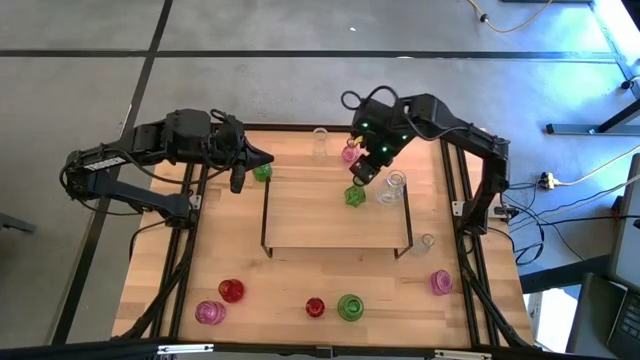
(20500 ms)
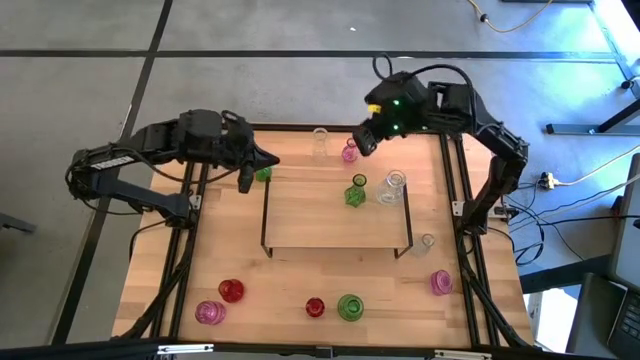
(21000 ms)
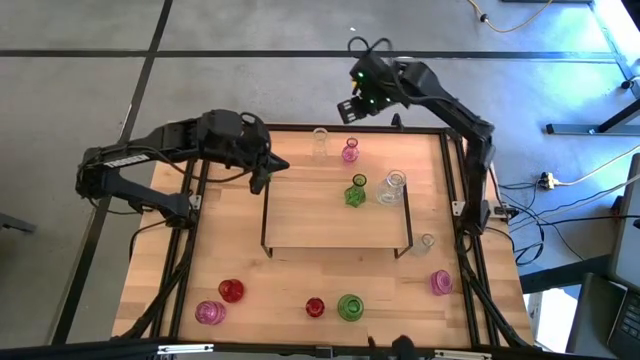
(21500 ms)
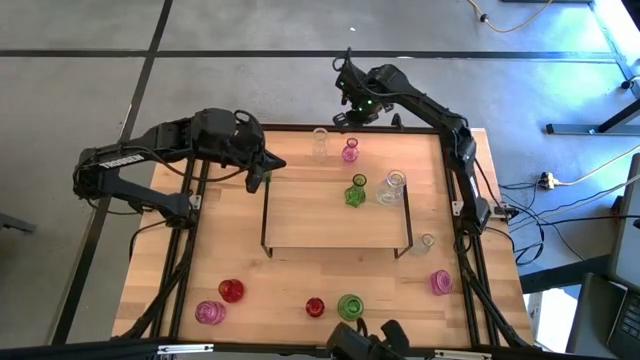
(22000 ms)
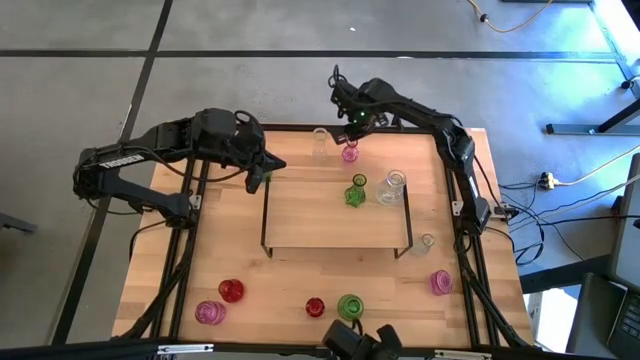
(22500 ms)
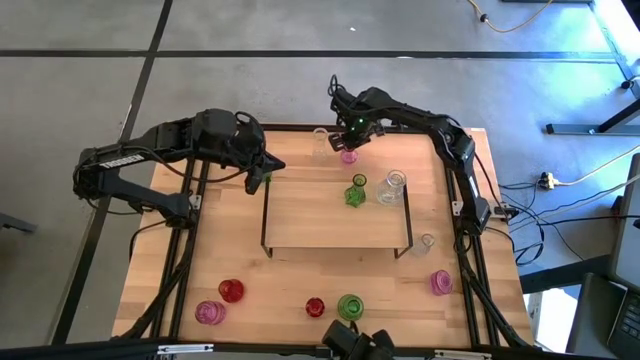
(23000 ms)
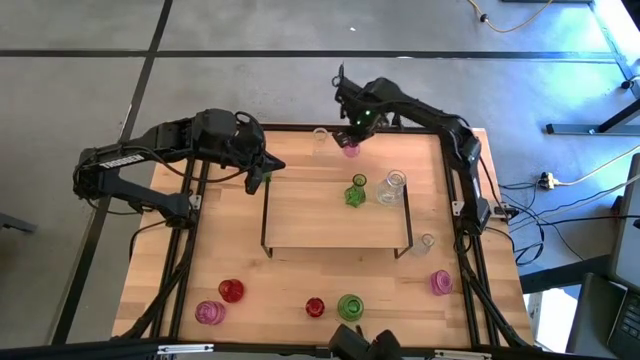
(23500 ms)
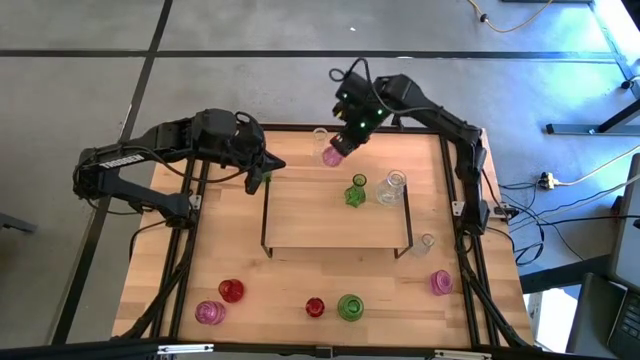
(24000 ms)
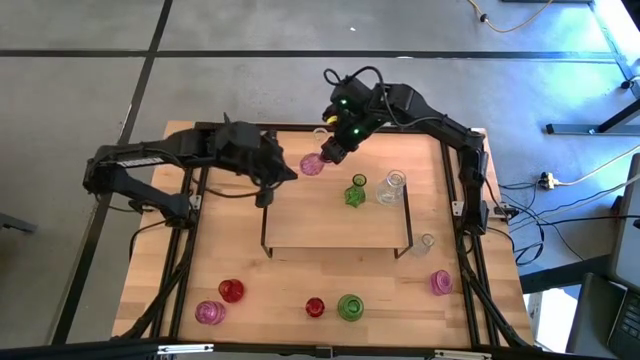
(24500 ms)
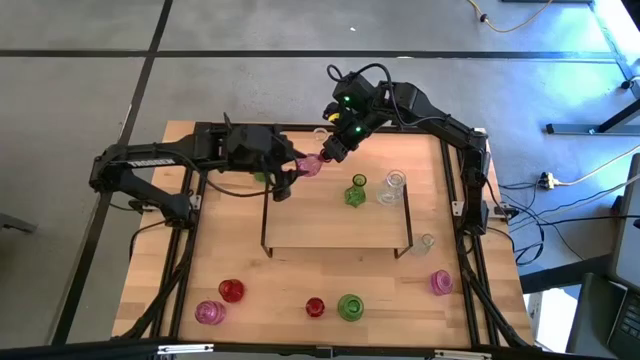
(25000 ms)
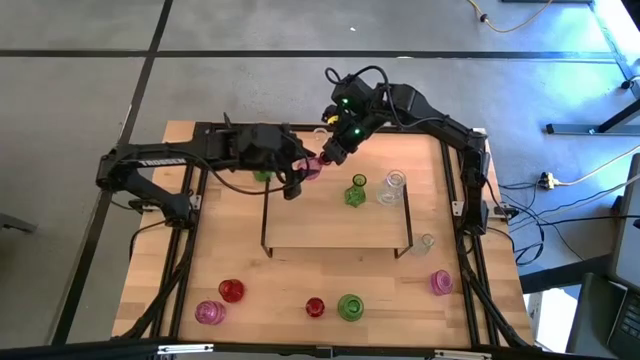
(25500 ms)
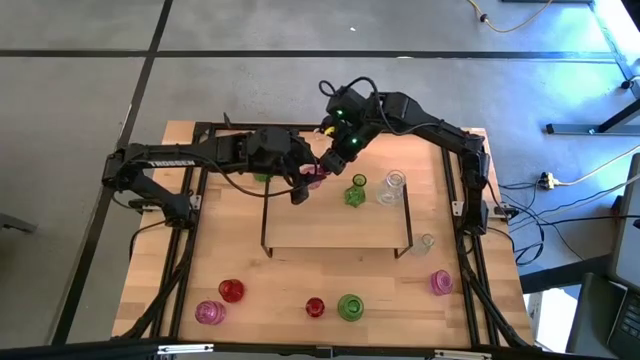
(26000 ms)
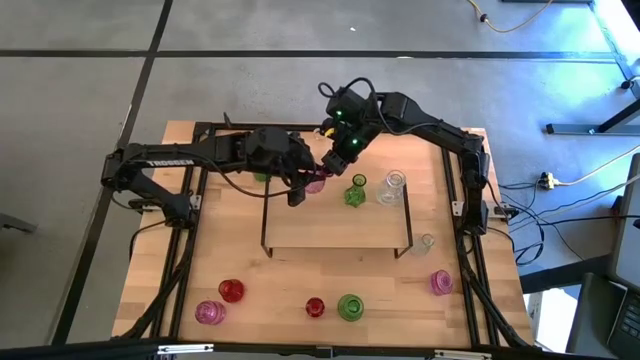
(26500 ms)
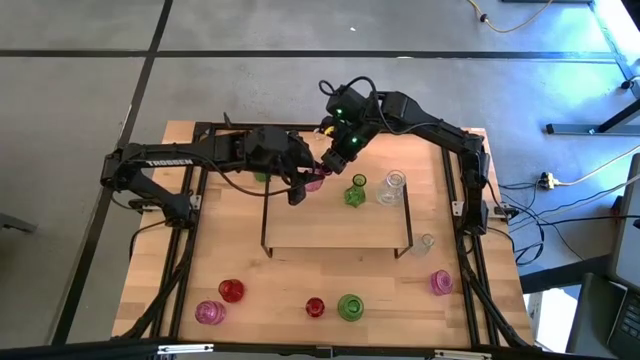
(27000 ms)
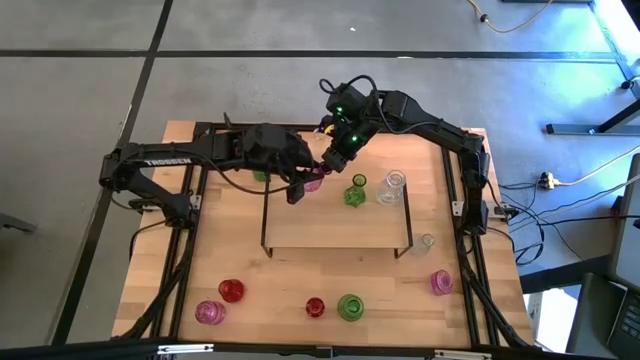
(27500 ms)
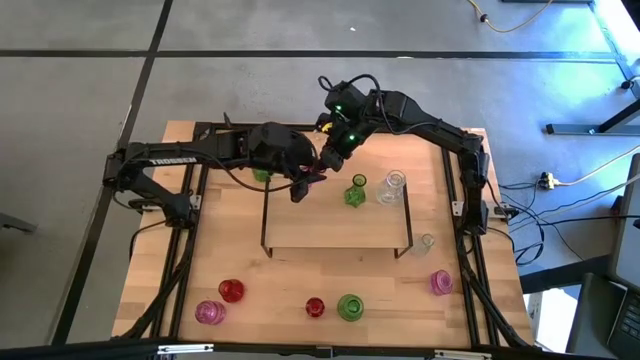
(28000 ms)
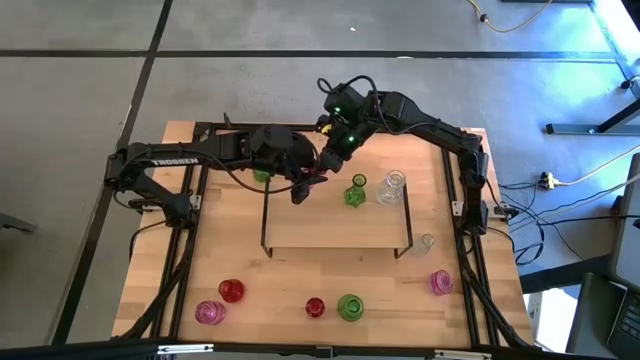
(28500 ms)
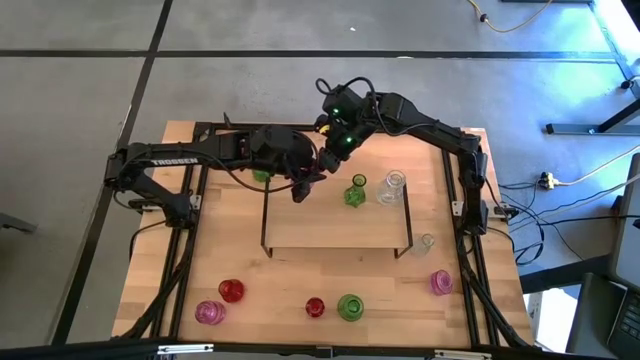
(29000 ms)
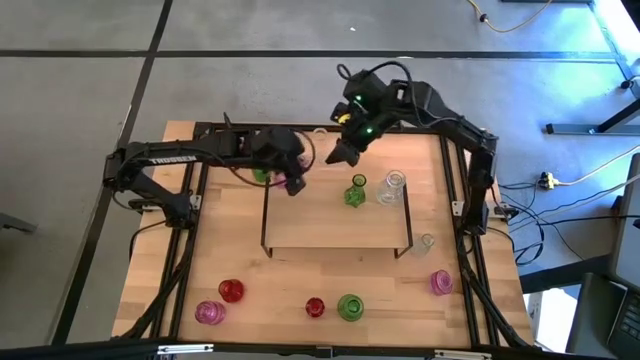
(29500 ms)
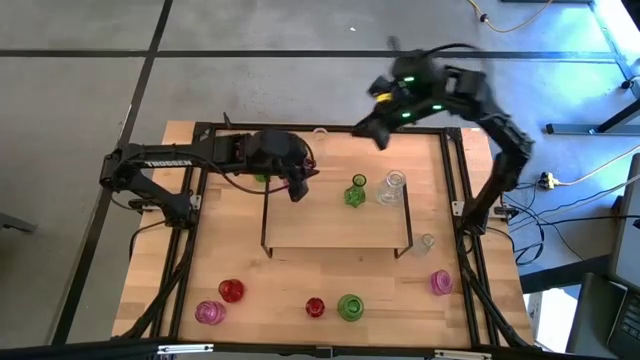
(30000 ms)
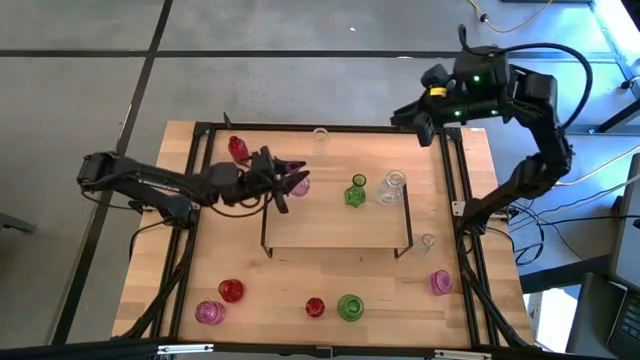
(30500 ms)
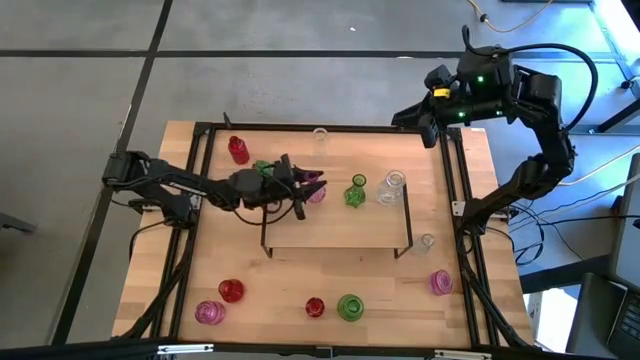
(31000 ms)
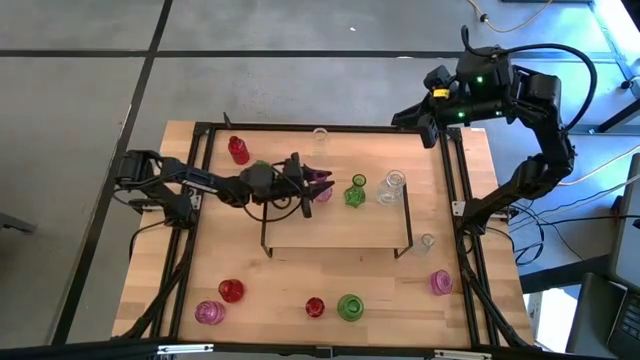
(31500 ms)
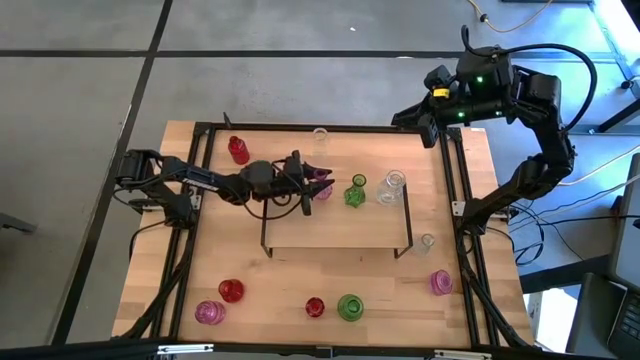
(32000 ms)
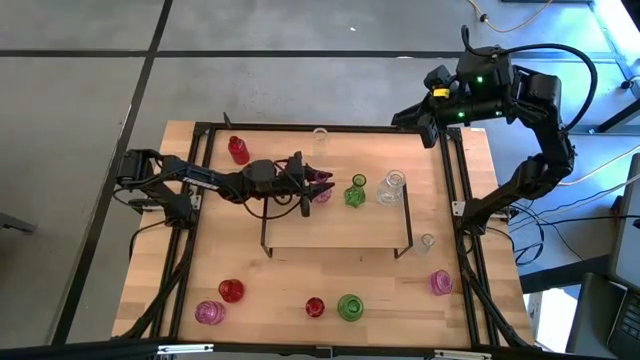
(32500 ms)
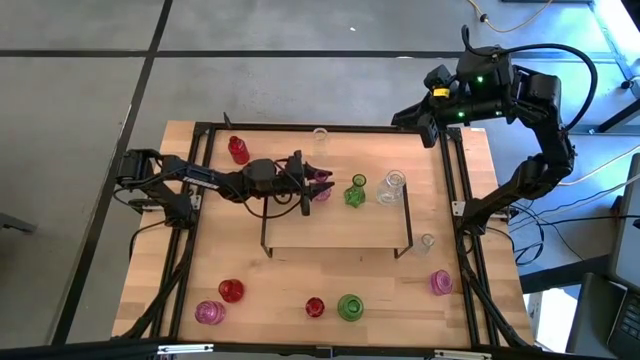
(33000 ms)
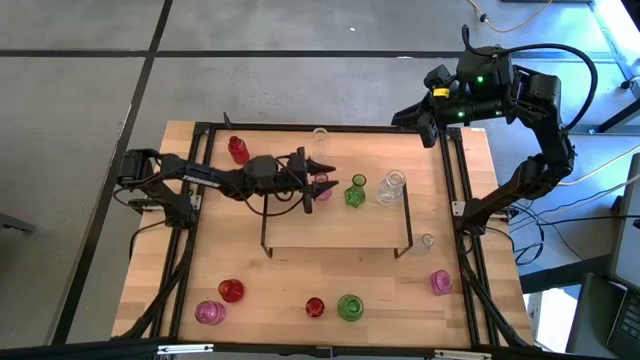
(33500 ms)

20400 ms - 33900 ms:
Task: sort vases onto shelf
Put the top violet vase on the shelf

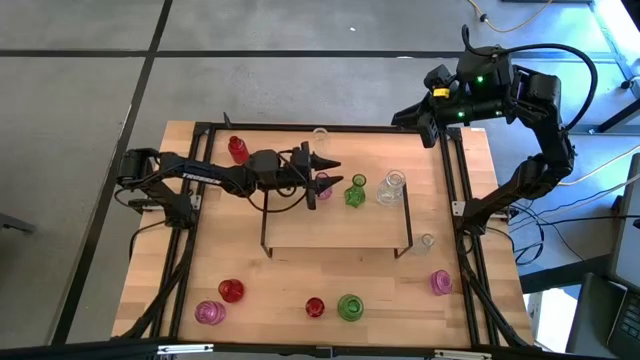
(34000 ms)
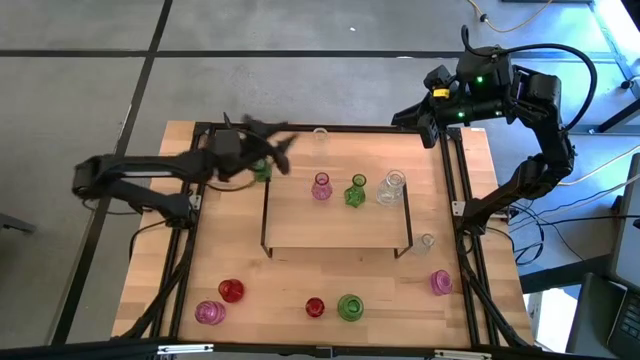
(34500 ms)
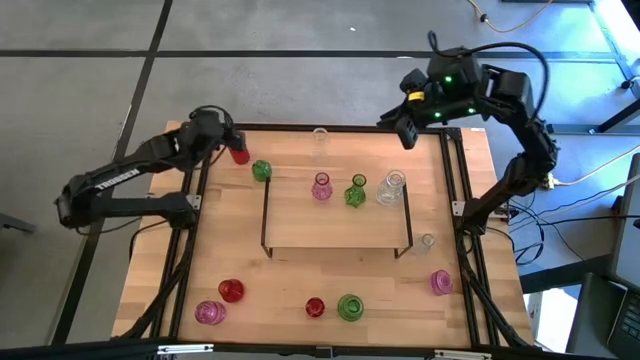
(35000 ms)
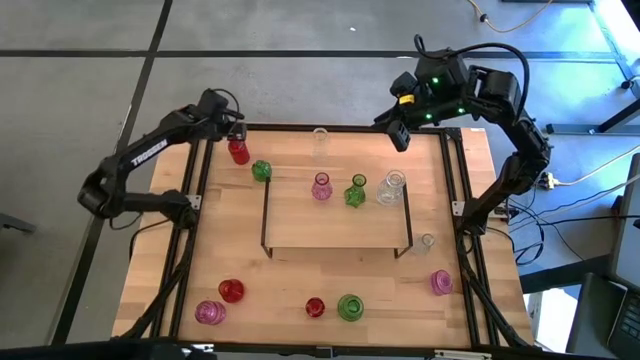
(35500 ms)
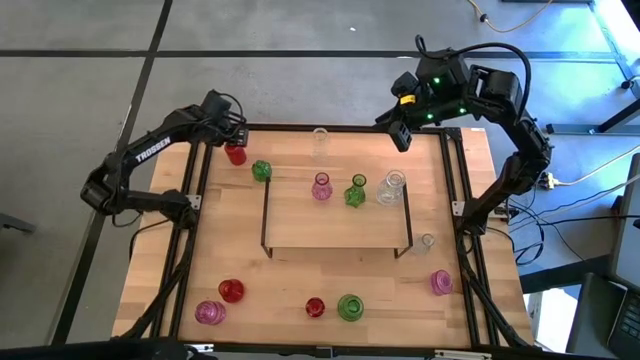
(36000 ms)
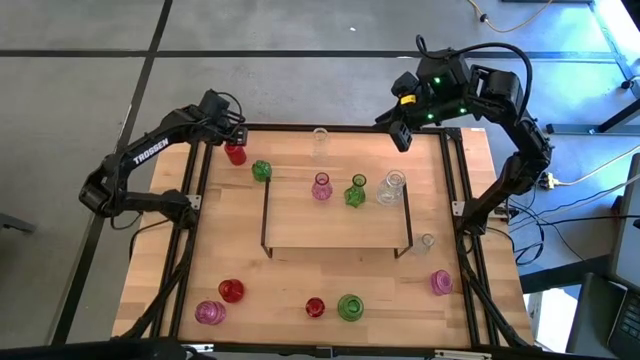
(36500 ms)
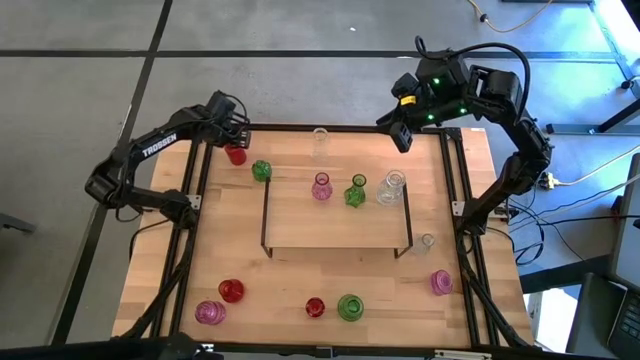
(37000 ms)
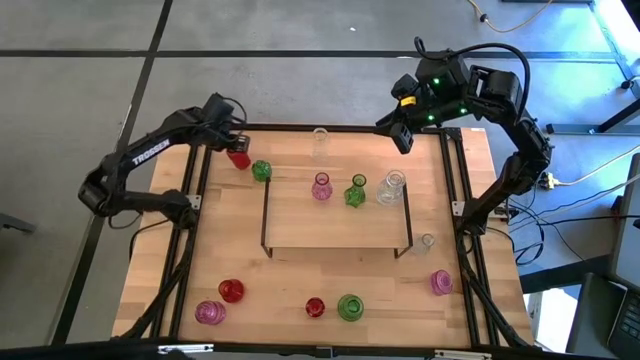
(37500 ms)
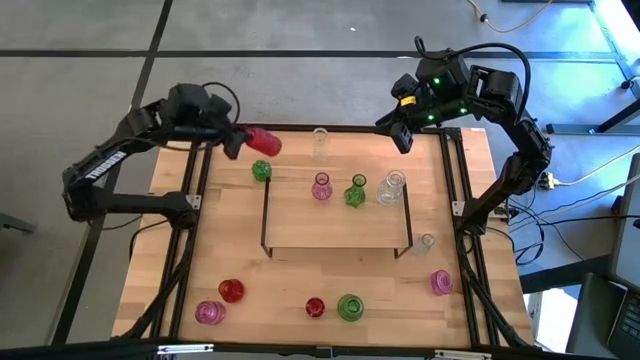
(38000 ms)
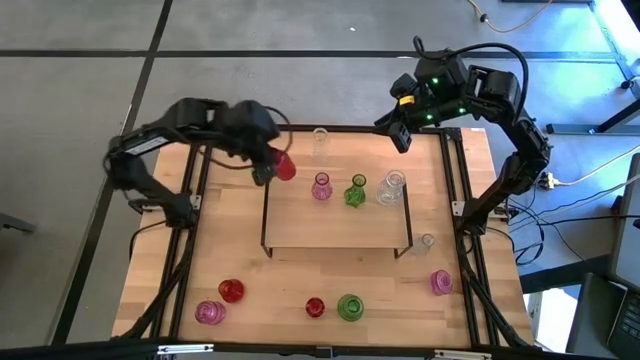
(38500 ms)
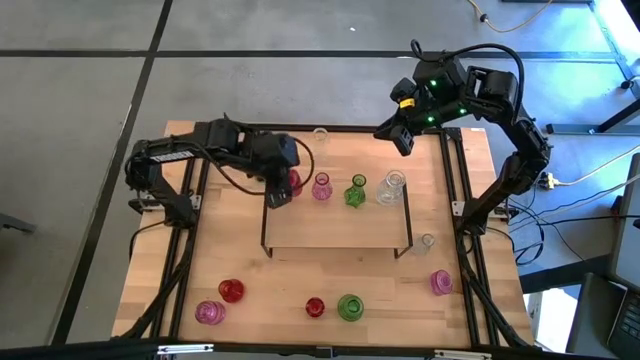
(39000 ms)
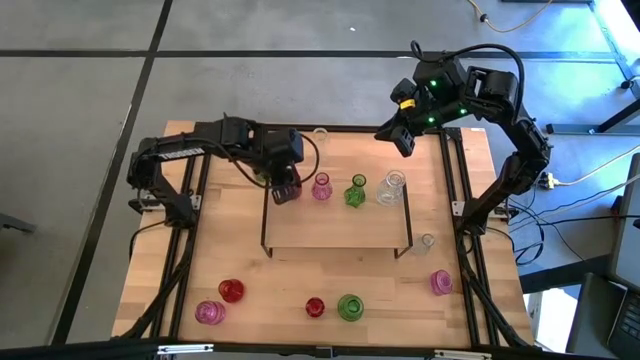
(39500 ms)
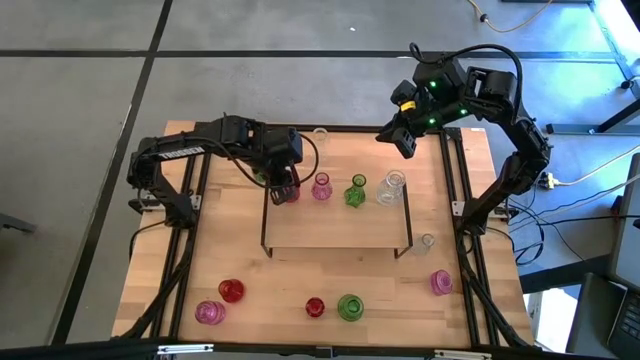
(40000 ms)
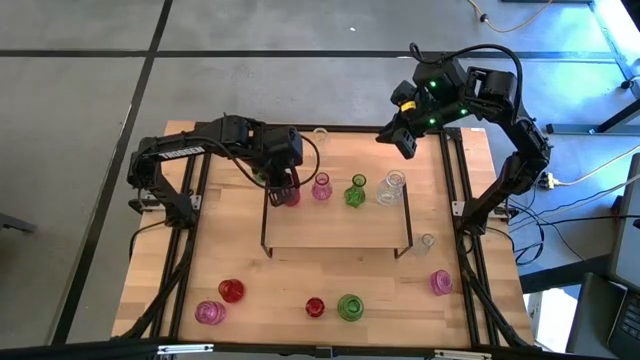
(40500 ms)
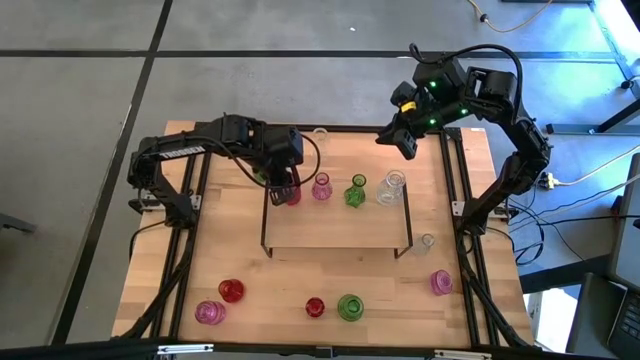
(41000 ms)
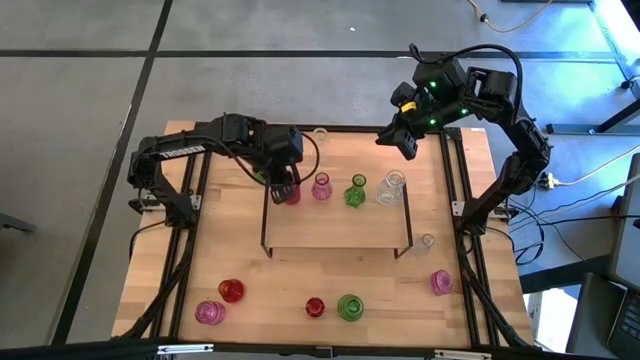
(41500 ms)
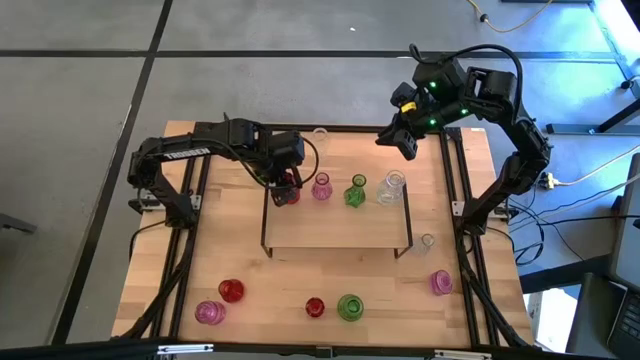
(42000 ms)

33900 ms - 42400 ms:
Put the top red vase on the shelf
